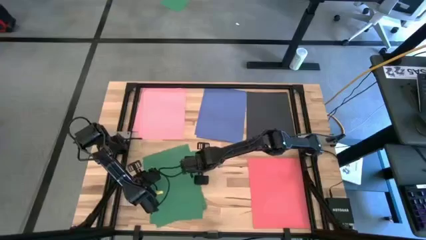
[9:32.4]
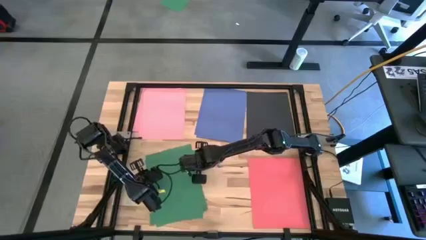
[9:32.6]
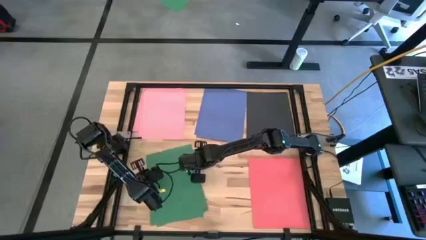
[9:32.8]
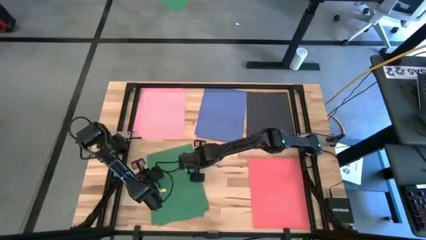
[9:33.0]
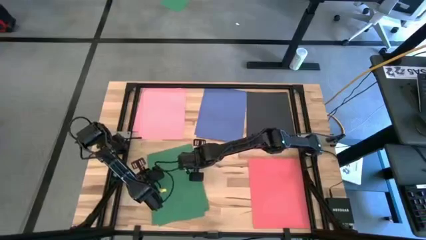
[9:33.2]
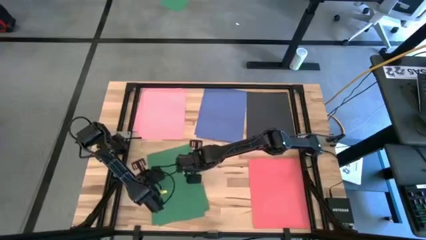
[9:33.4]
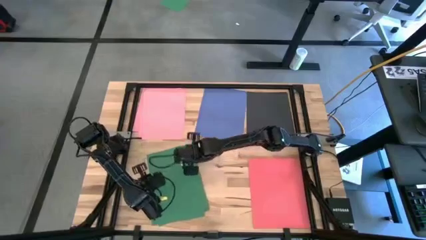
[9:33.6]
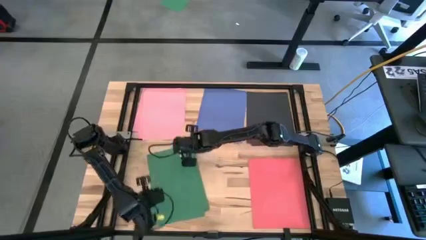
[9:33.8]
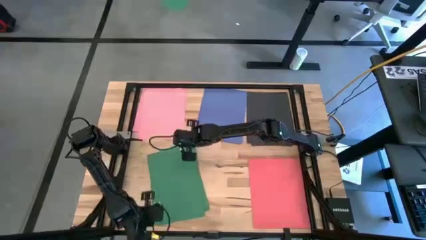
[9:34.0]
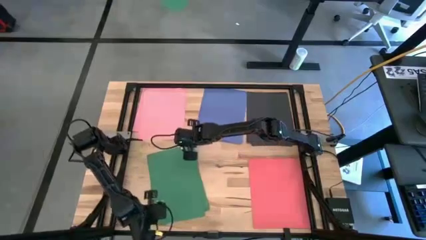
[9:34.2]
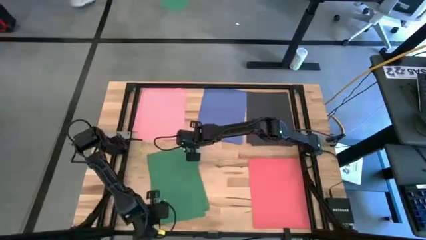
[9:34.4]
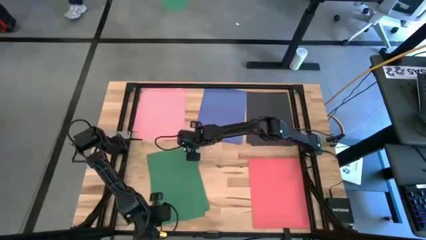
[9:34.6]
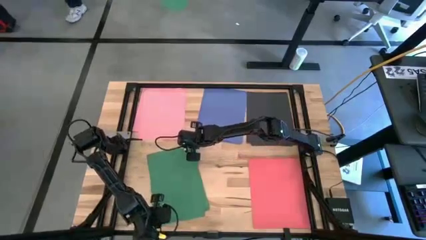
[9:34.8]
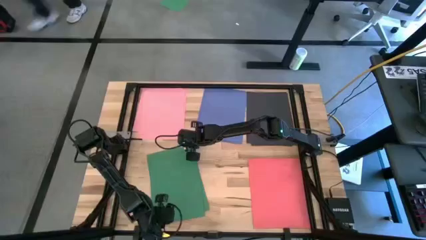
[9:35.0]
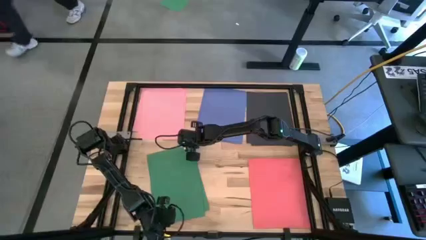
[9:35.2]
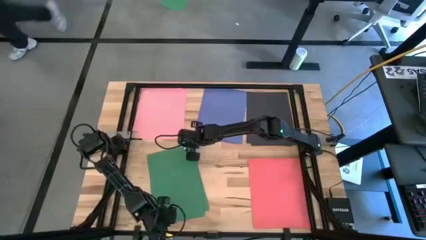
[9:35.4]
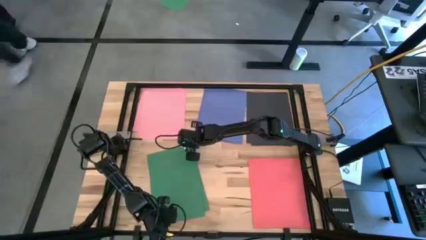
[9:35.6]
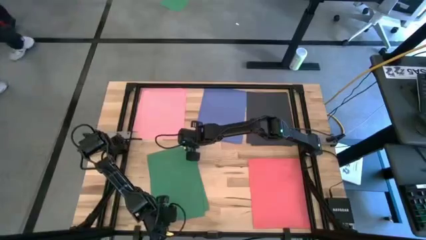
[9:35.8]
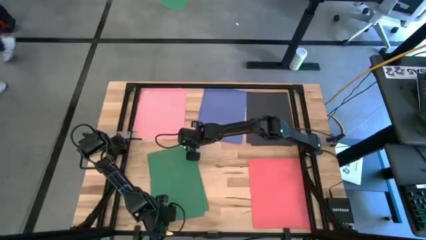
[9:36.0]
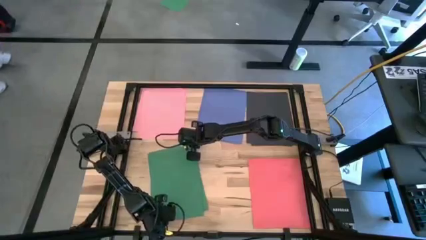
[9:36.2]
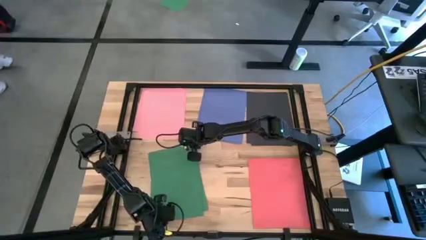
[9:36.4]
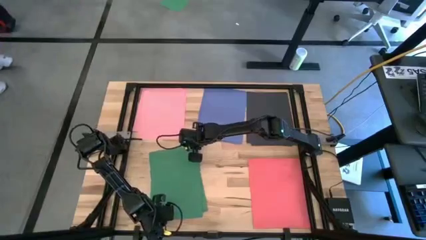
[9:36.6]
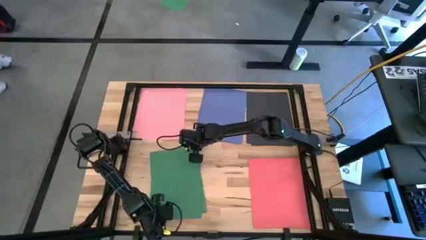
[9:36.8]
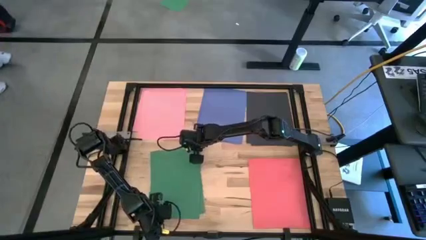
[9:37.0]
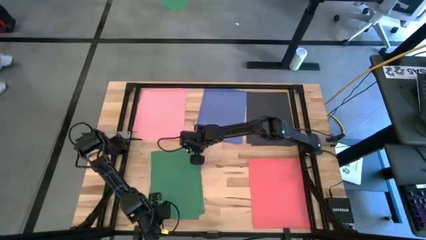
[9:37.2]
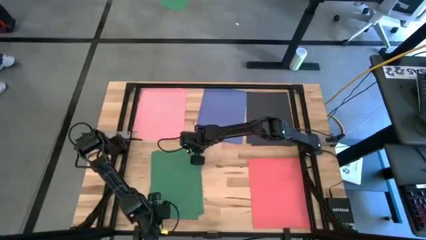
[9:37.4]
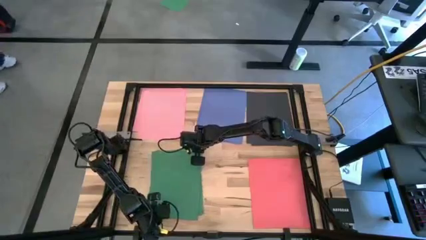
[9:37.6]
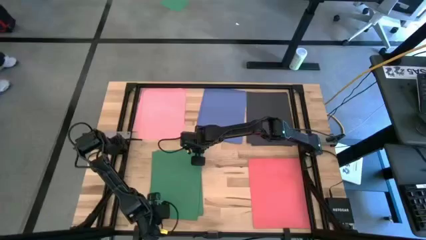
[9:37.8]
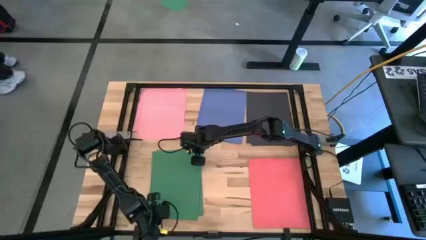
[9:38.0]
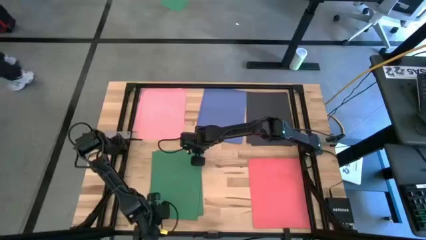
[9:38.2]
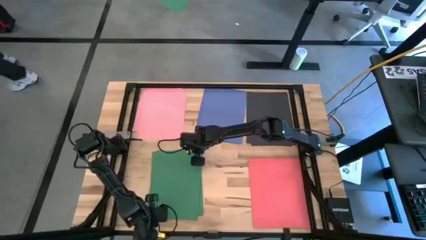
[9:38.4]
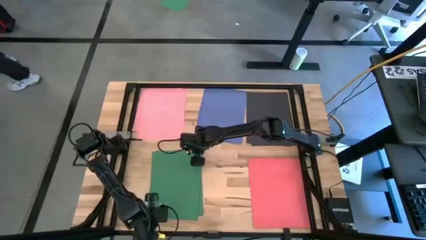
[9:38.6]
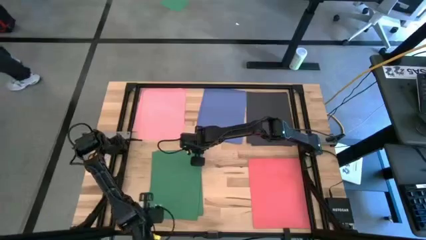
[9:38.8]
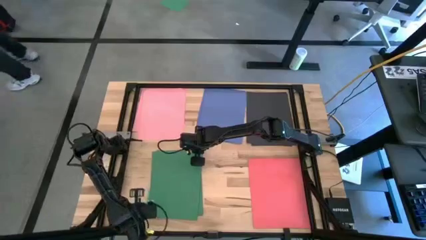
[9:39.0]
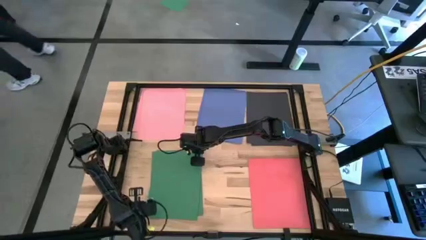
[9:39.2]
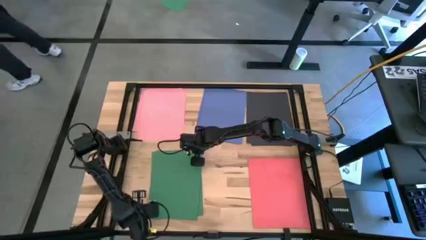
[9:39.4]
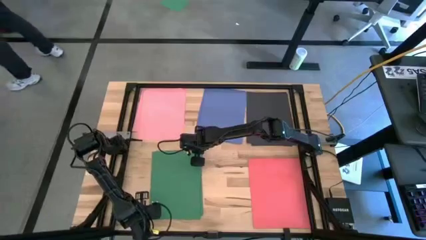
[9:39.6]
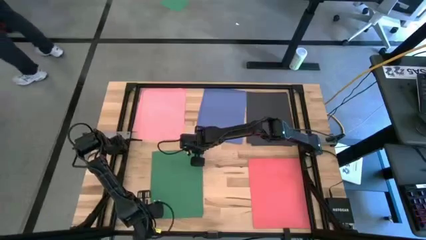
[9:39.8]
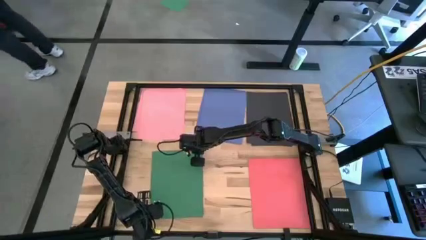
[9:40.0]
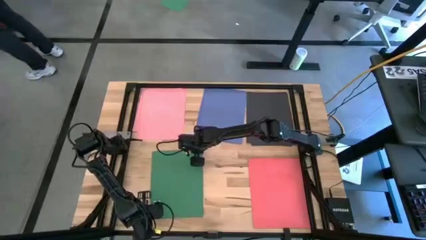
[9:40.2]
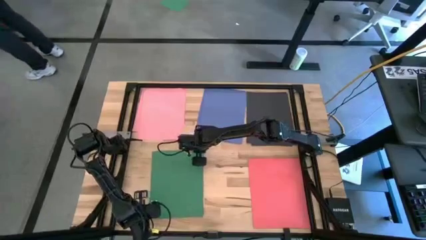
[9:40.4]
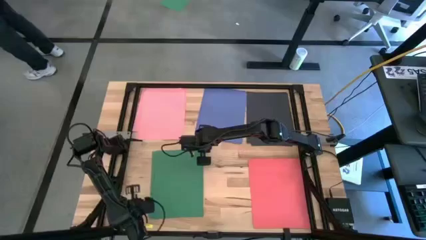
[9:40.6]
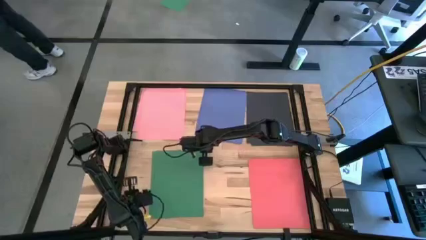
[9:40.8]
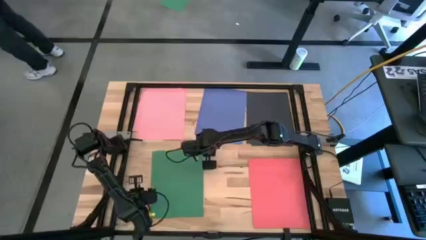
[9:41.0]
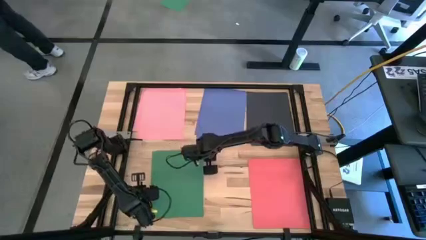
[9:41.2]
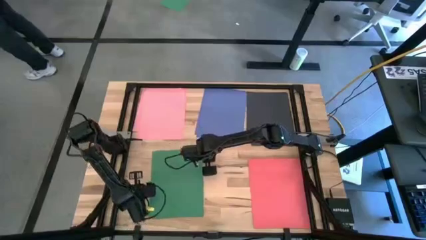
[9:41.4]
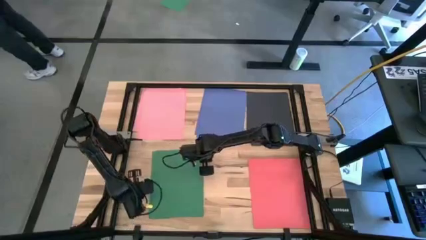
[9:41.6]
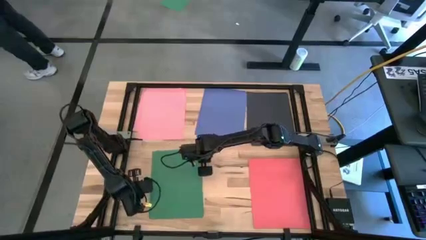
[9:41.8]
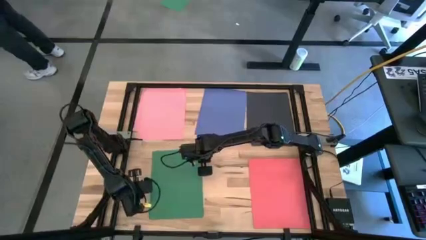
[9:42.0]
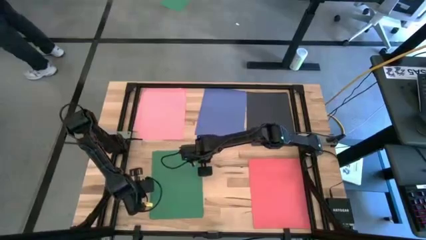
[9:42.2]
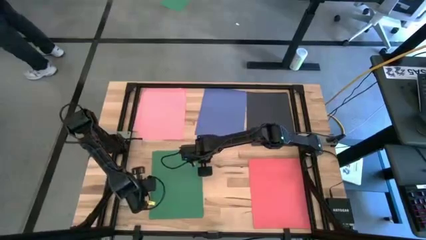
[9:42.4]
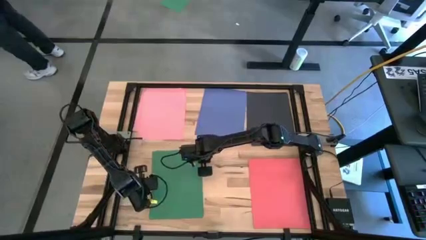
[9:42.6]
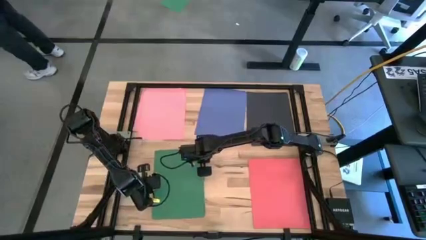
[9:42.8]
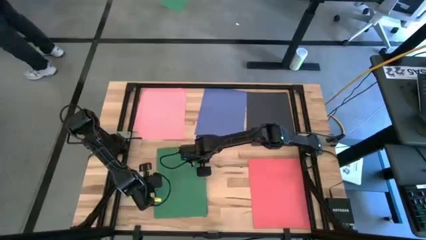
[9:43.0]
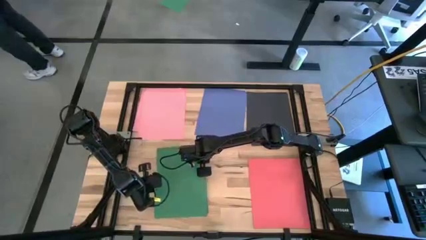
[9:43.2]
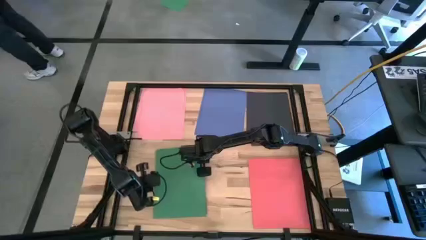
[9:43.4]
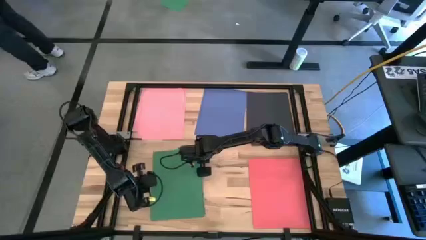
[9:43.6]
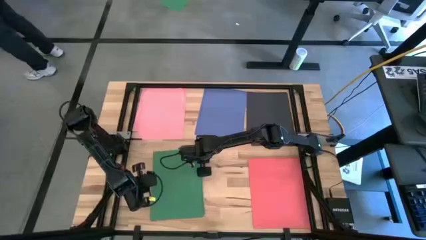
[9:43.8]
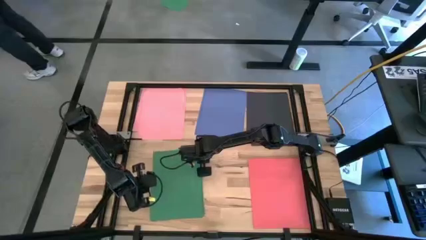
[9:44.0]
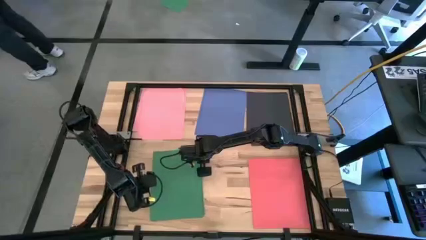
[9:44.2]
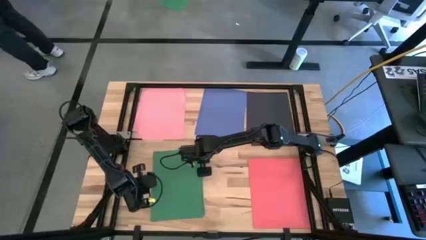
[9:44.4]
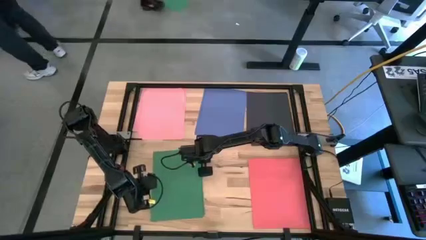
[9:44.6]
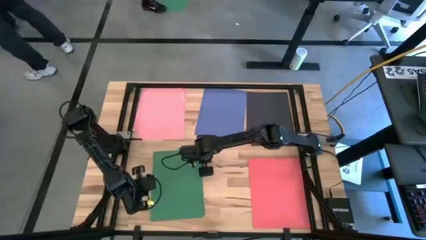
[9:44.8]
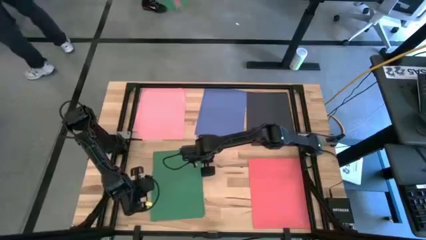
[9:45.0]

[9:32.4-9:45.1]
Task: Organize paper
Adjust the green papers on the table

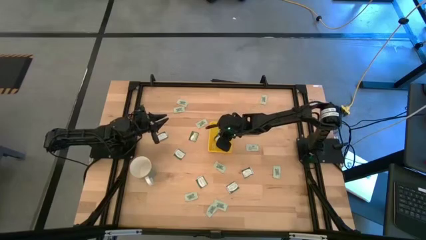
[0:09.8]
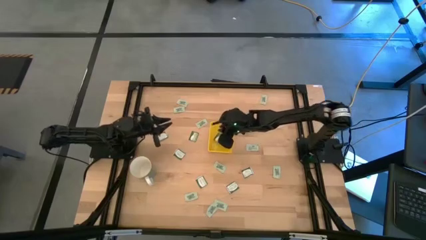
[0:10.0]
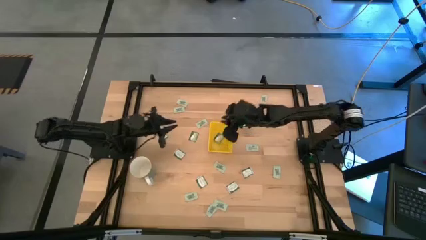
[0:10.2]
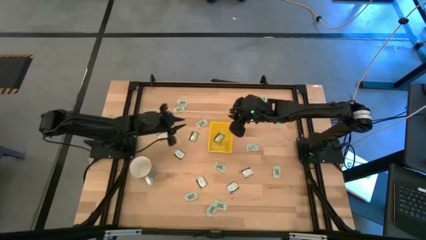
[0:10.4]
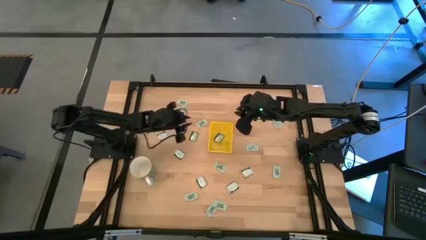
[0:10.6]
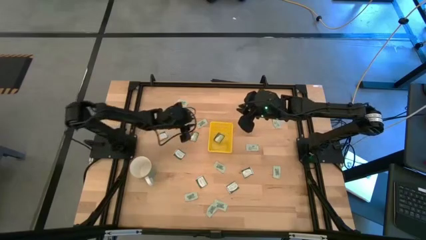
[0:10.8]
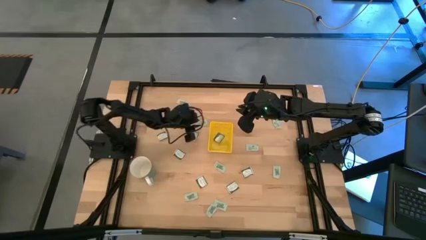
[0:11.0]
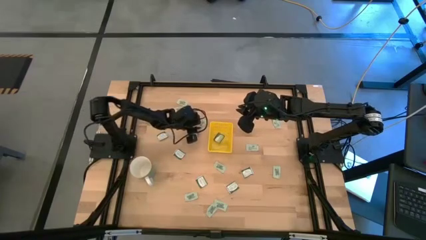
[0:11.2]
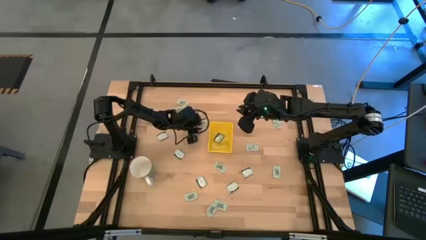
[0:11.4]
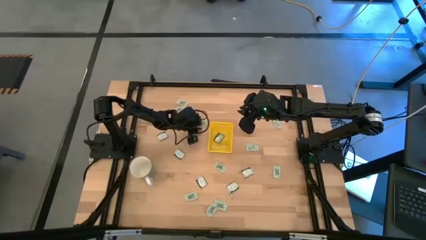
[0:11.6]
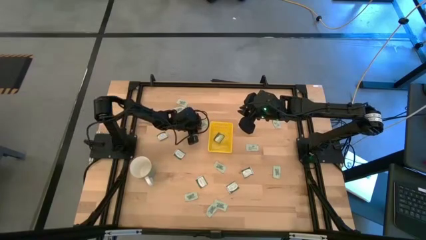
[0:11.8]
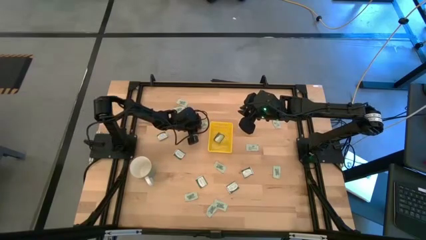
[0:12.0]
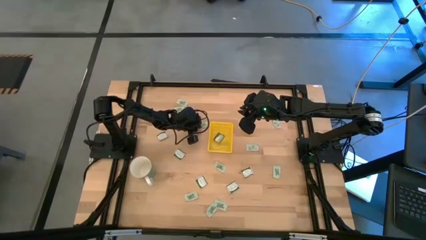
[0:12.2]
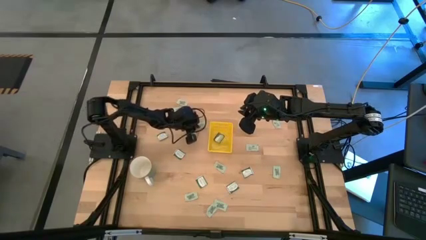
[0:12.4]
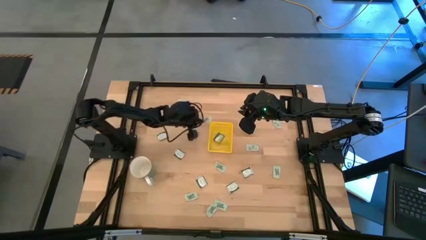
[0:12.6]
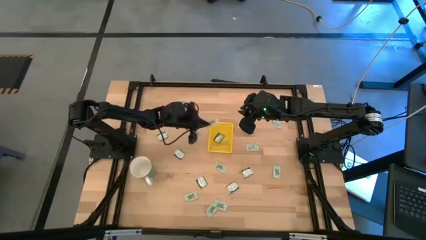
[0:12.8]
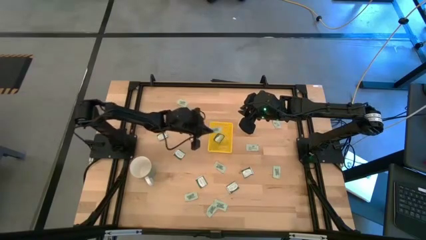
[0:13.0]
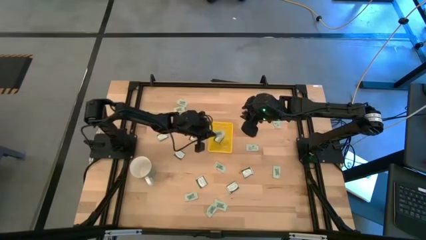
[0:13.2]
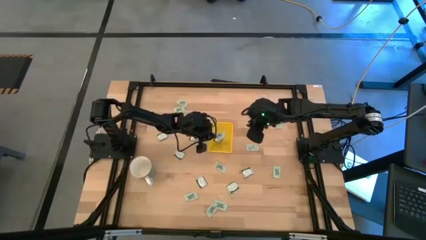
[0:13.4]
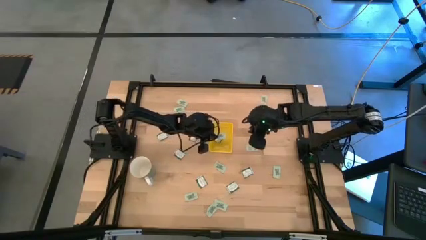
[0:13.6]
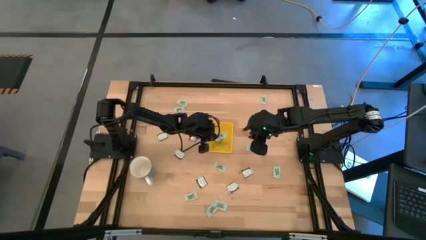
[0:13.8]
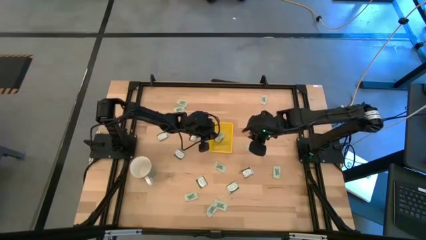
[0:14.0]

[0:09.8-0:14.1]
Task: Pick and place Stevia / Truvia into bins
Put the white stevia packet into the yellow bin
